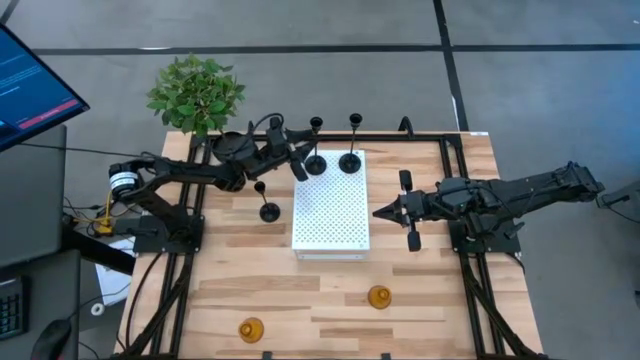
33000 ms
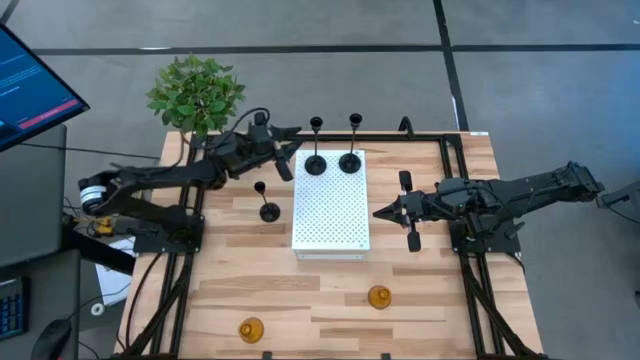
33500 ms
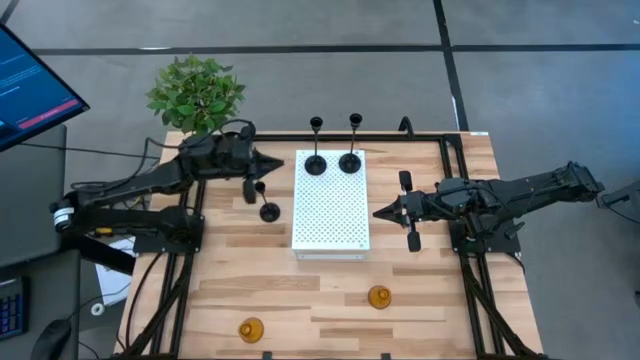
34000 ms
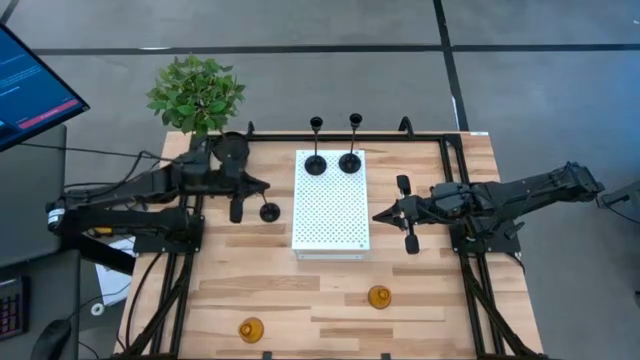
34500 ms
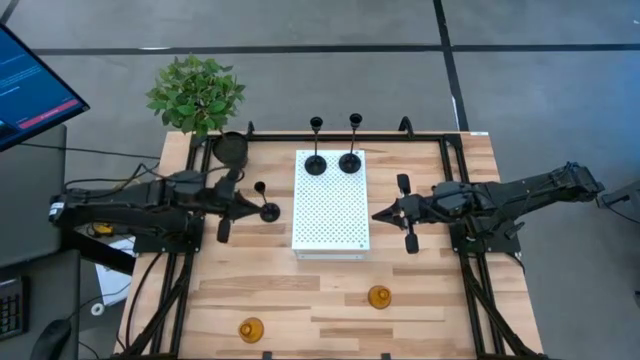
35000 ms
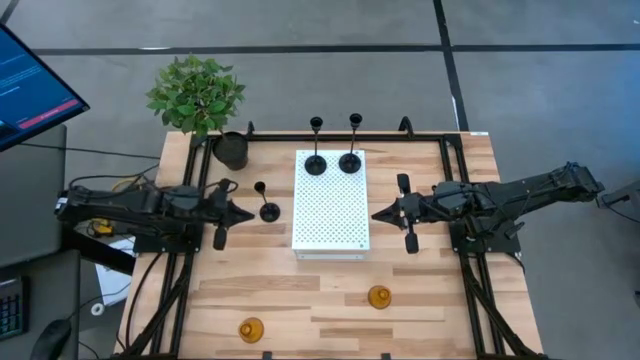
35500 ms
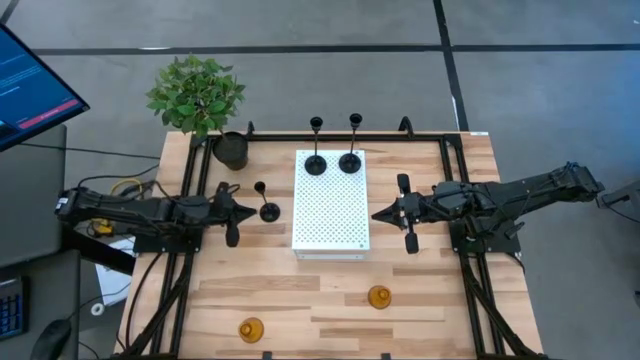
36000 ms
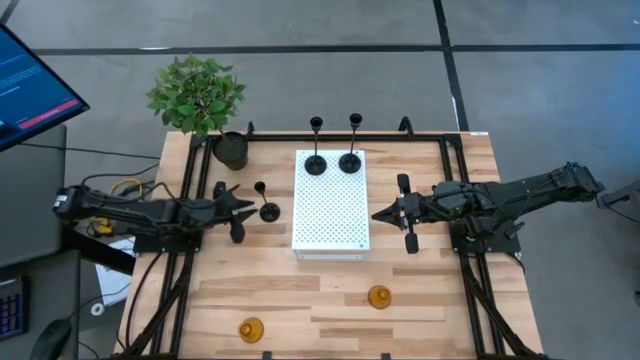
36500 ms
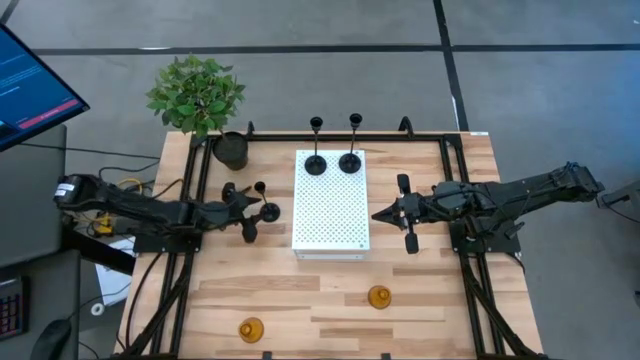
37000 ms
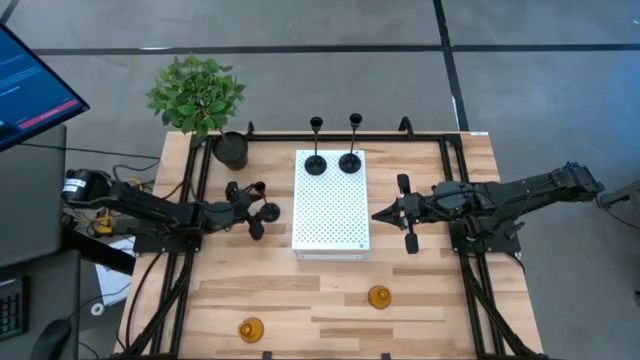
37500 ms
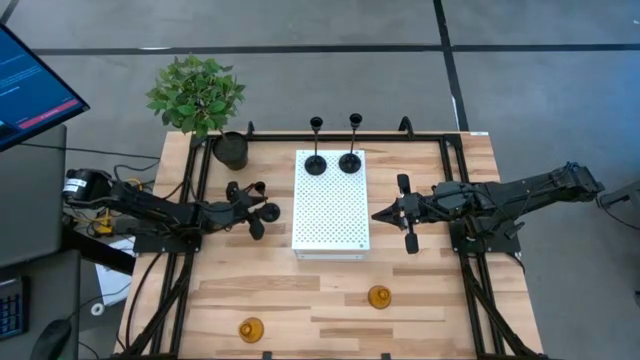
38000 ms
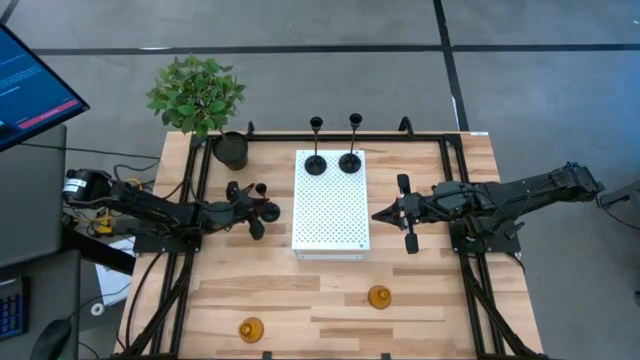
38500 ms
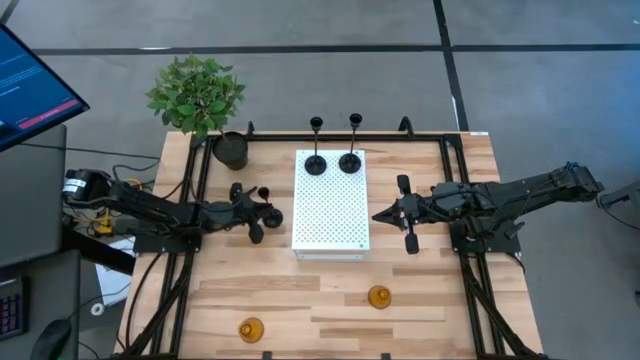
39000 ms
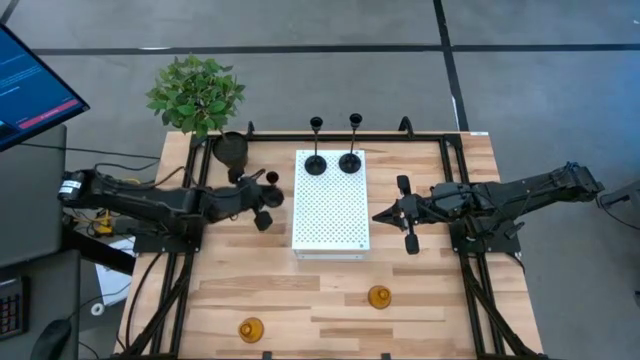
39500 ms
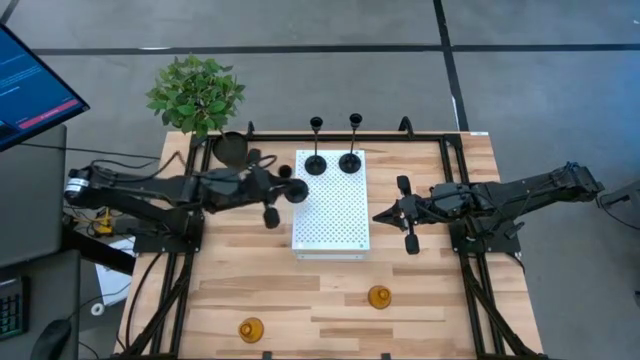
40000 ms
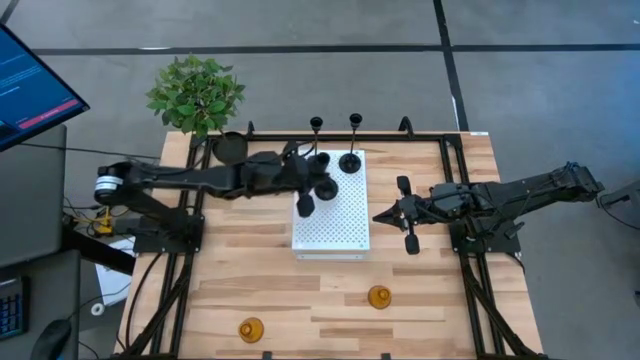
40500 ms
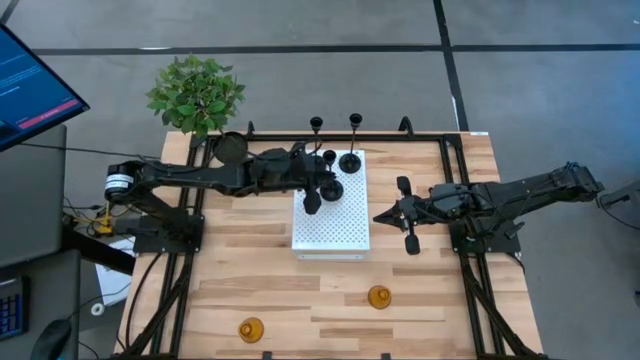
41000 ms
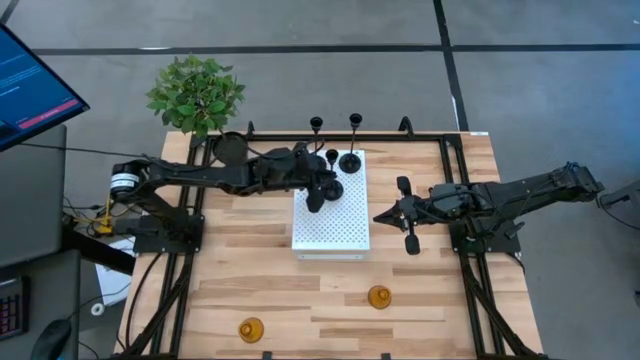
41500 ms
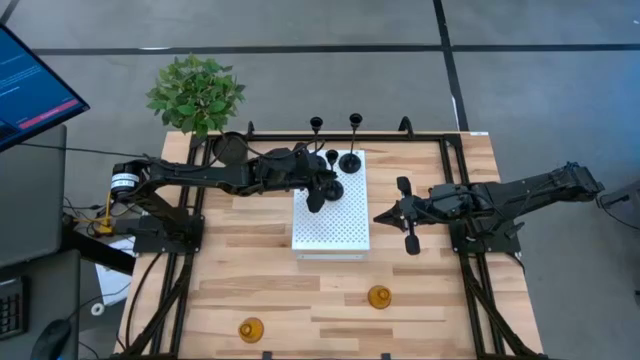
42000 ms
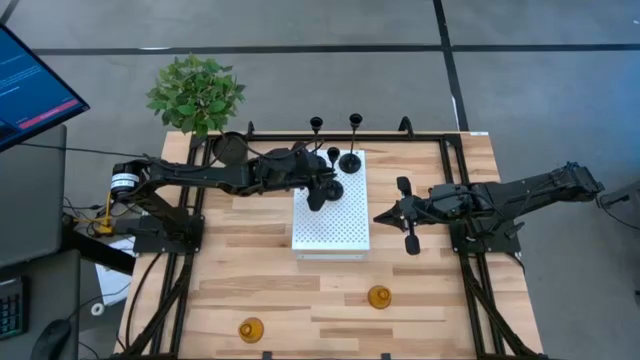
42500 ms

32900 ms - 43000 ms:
Task: Pick & Place candle stick holders
Put the black candle holder on the shelf

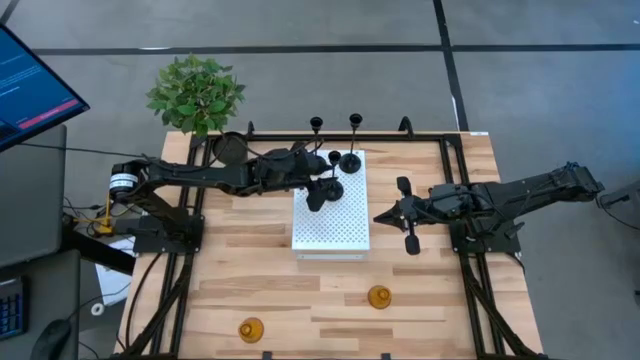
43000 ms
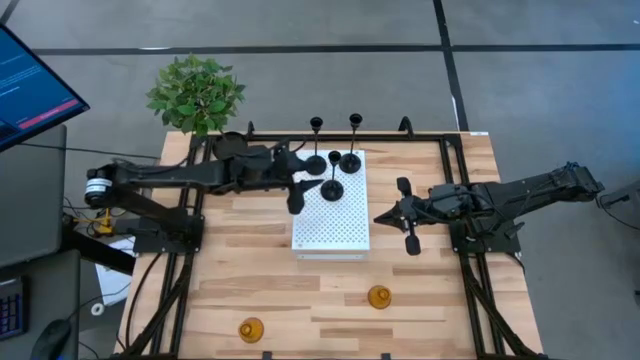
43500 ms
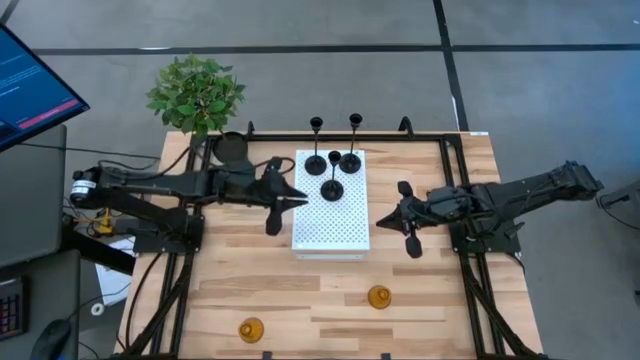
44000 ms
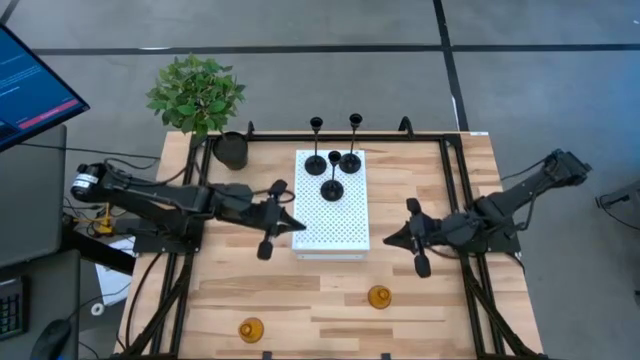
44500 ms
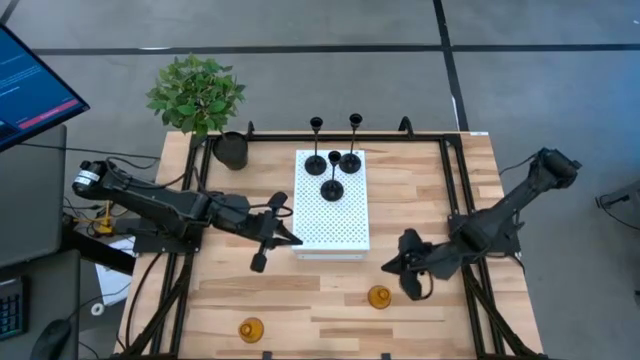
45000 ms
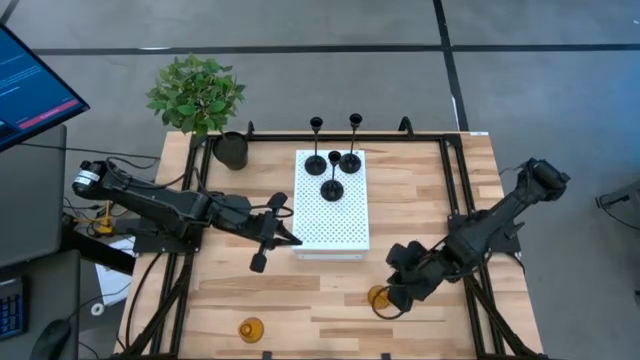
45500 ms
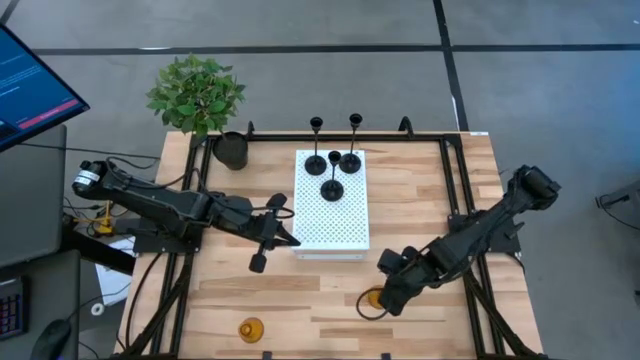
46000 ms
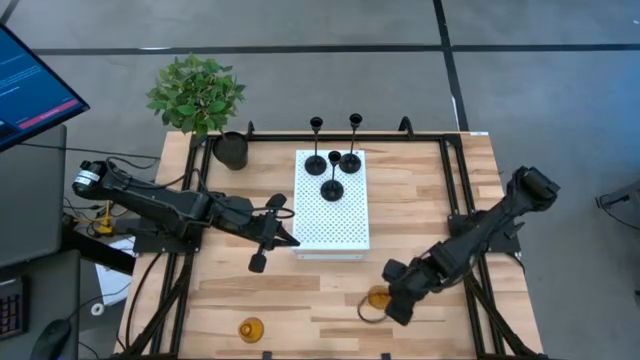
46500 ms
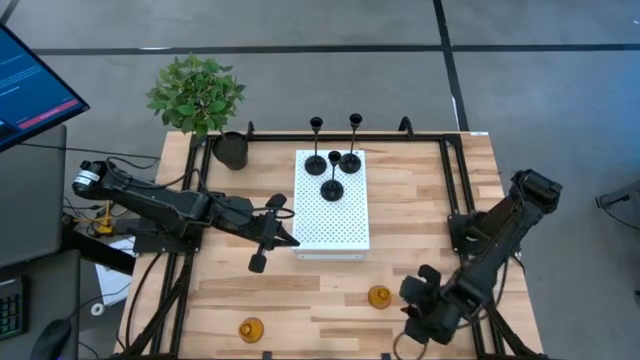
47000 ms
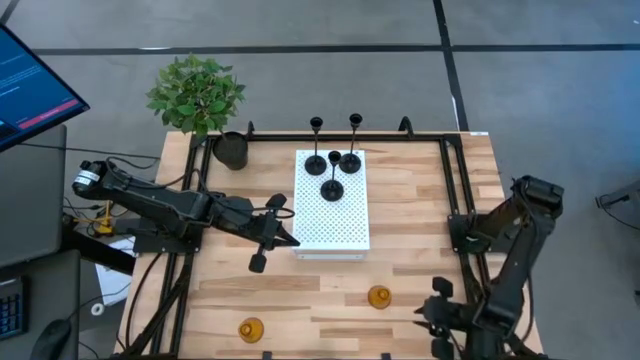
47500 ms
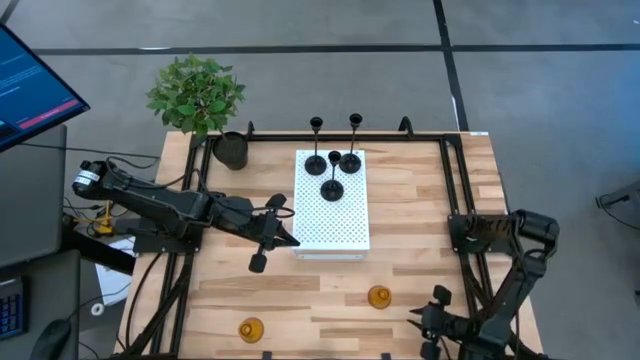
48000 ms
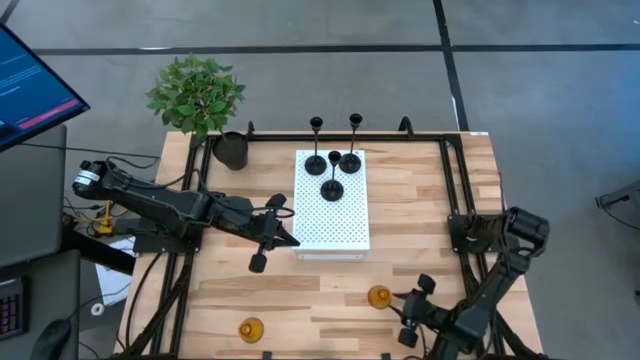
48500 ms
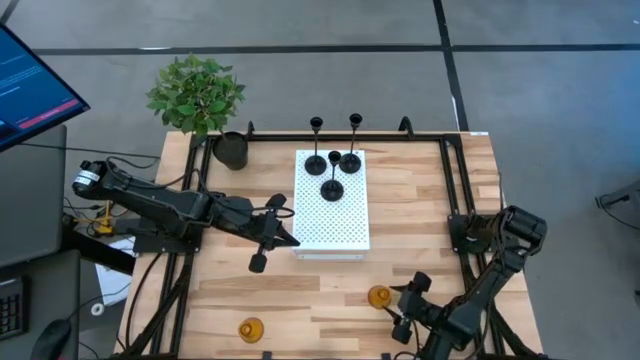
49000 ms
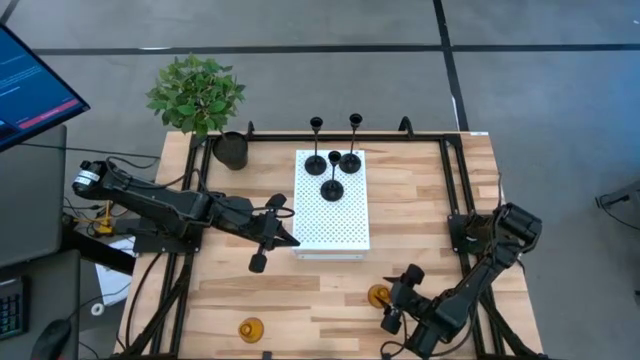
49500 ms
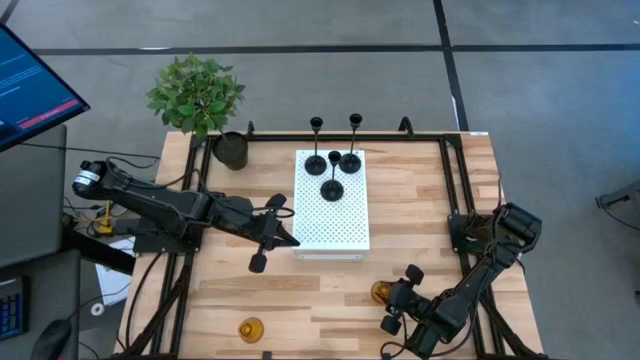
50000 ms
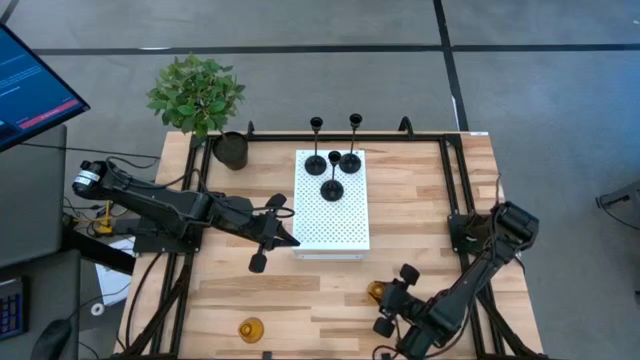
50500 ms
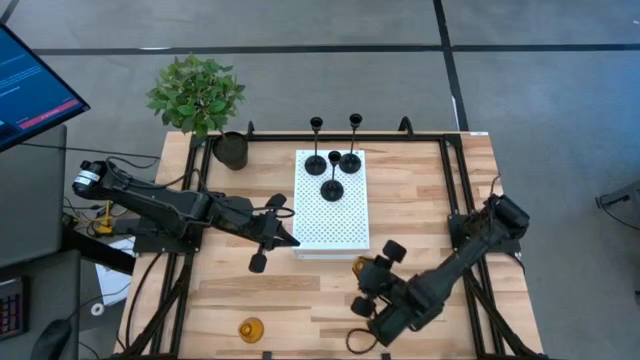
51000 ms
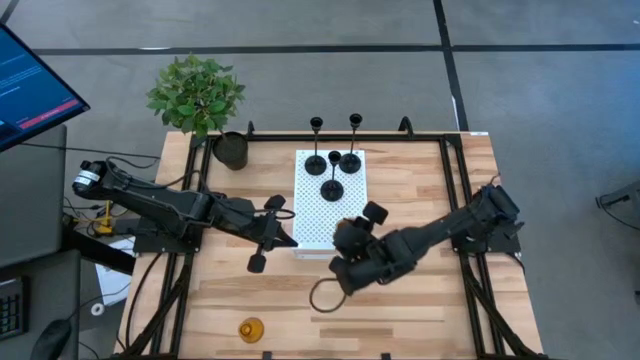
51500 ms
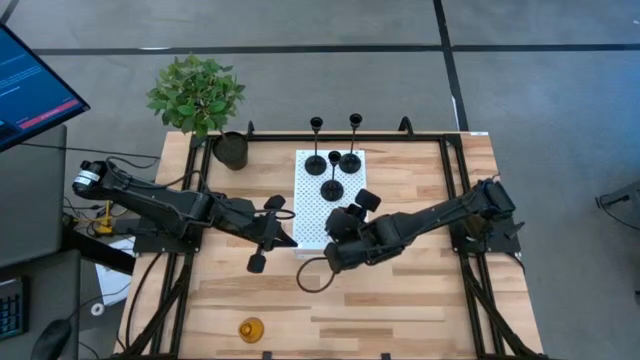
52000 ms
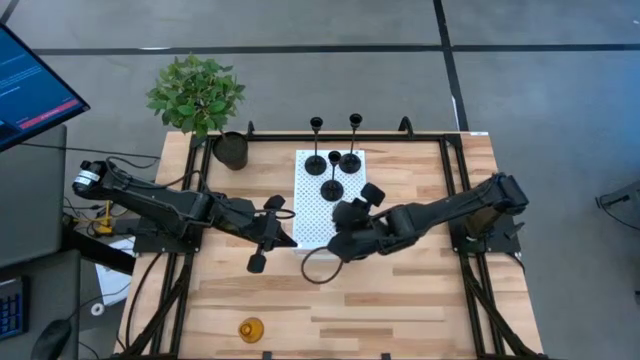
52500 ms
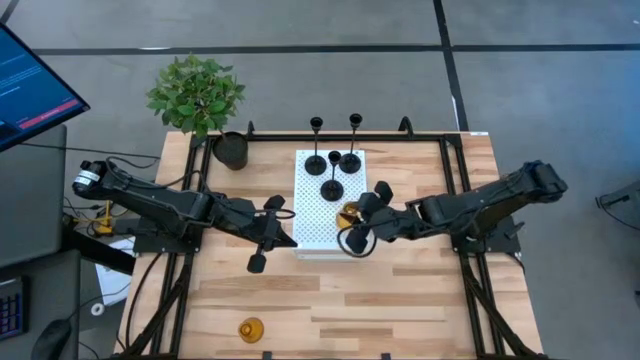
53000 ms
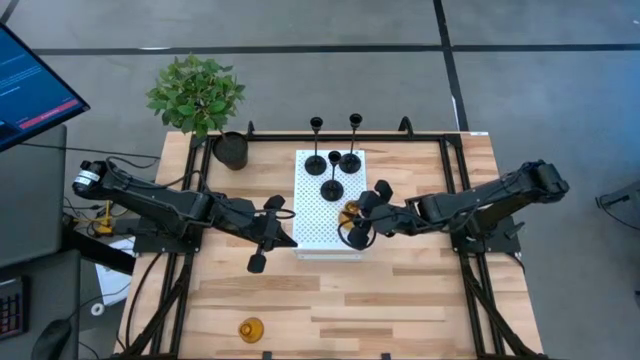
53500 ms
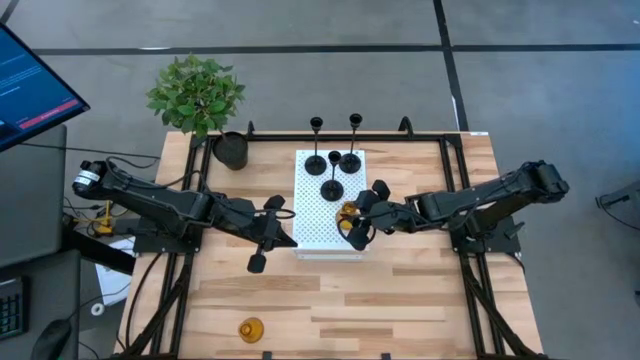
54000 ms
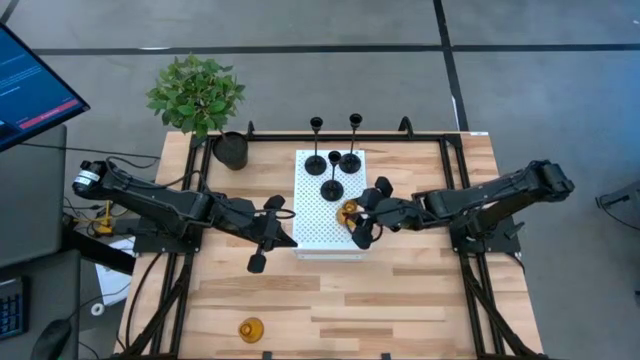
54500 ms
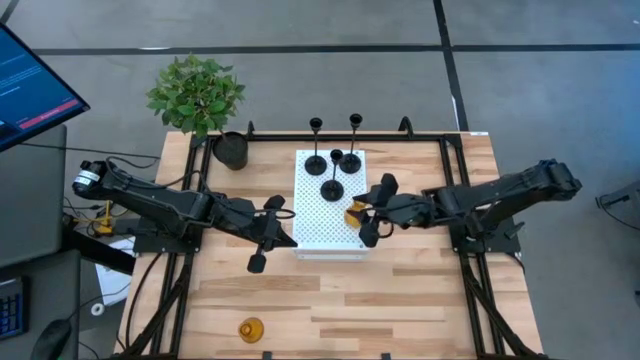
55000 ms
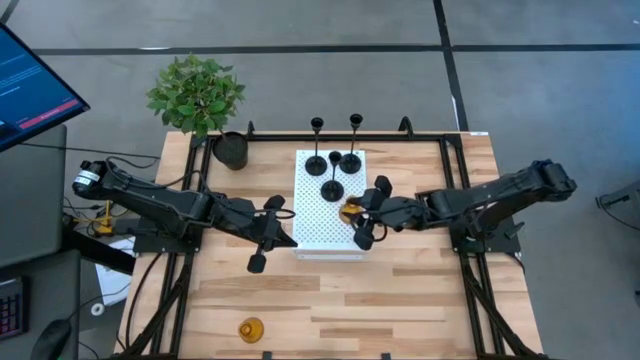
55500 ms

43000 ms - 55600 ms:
Put the right yellow glass candle holder on the shelf
